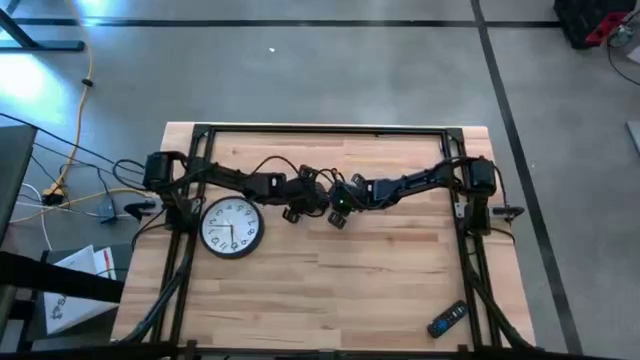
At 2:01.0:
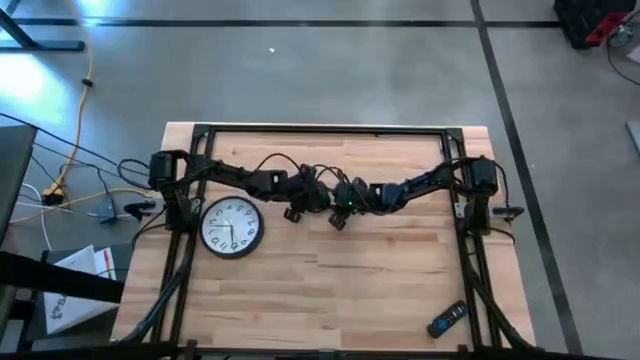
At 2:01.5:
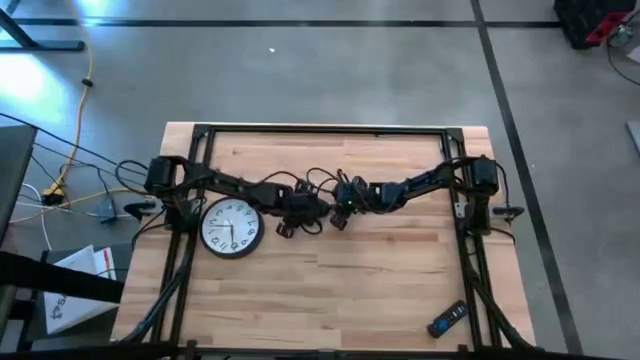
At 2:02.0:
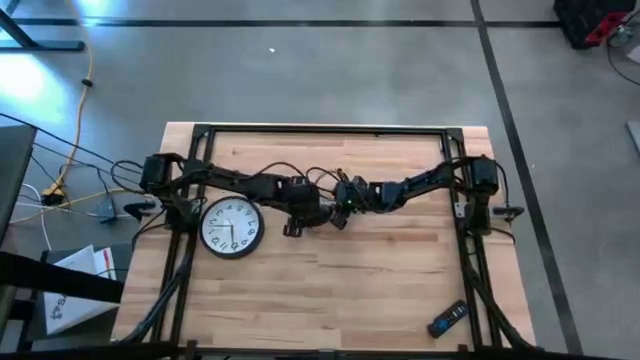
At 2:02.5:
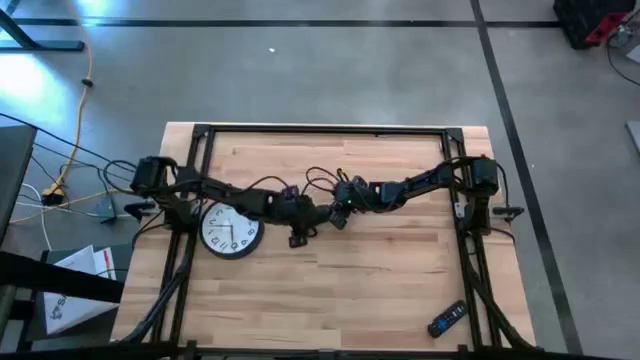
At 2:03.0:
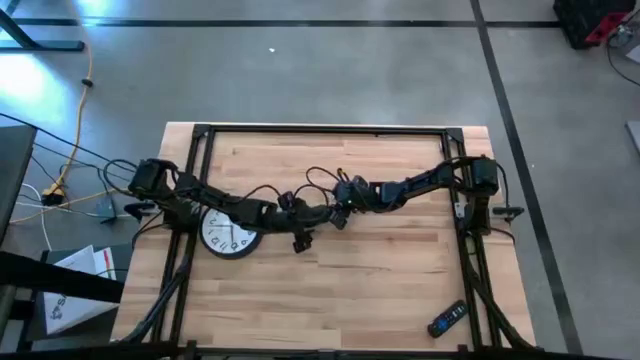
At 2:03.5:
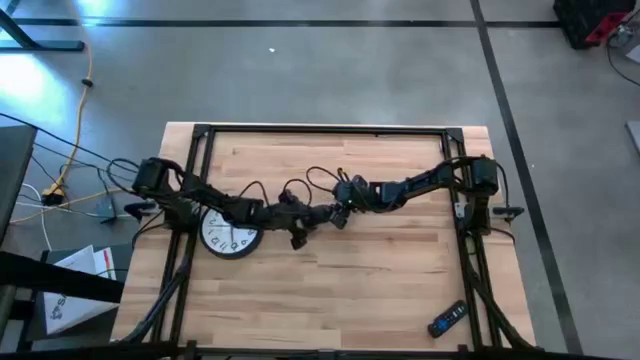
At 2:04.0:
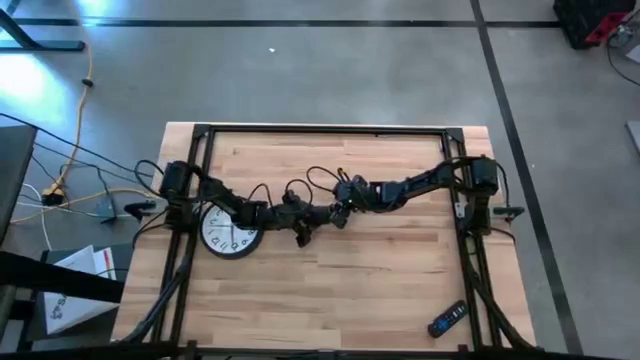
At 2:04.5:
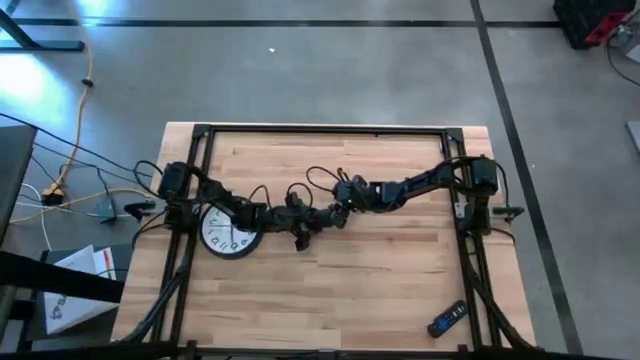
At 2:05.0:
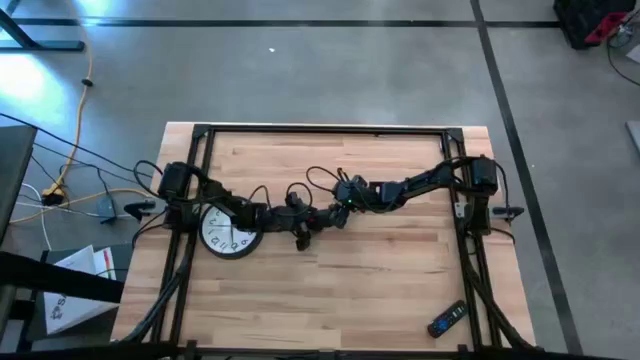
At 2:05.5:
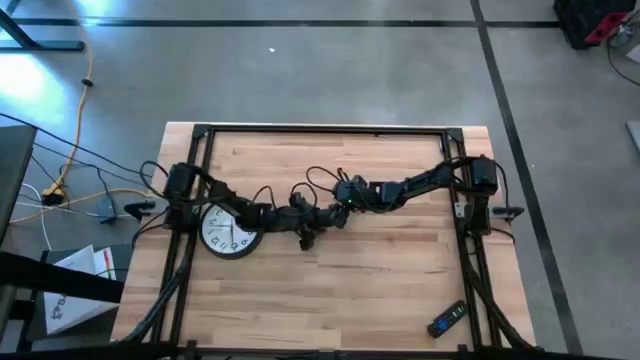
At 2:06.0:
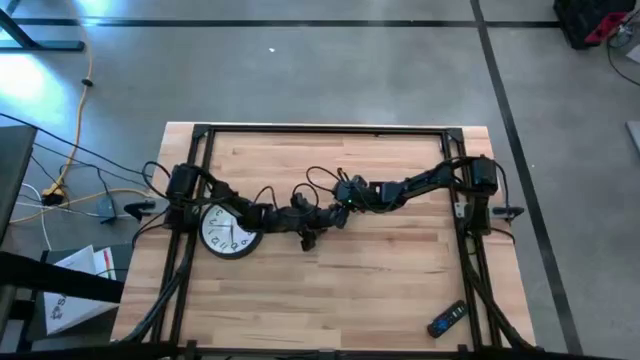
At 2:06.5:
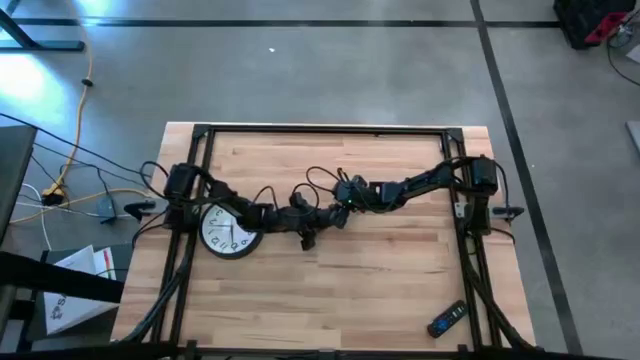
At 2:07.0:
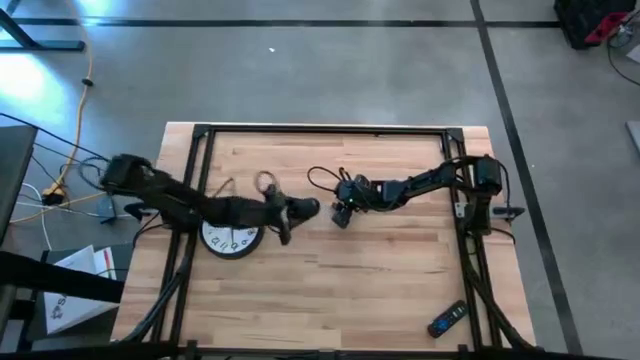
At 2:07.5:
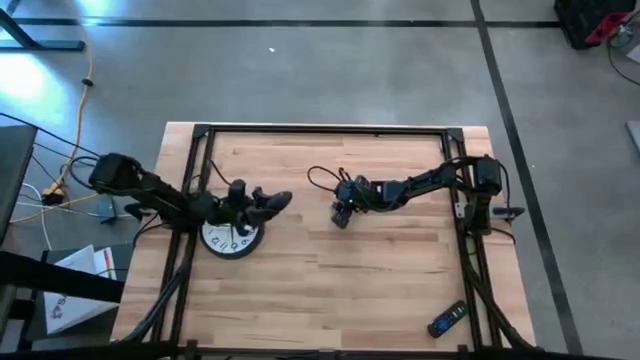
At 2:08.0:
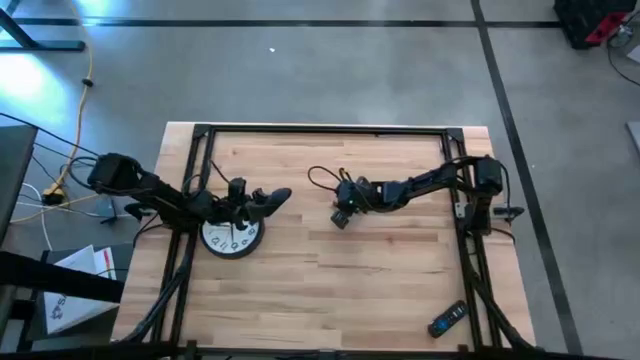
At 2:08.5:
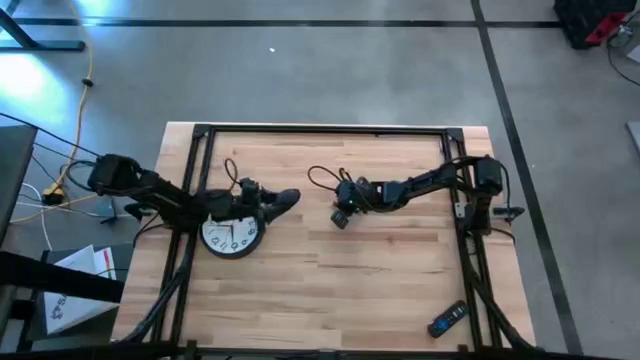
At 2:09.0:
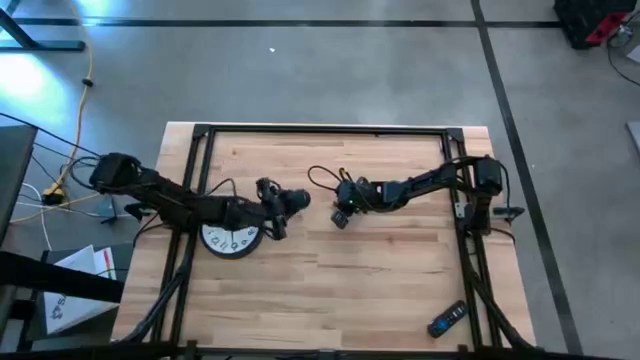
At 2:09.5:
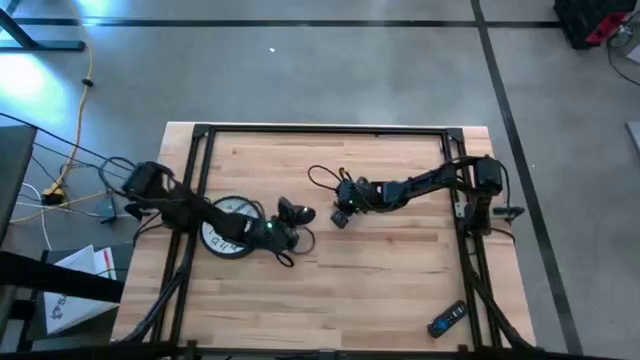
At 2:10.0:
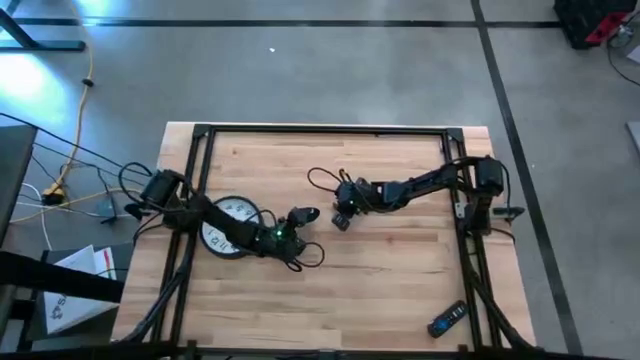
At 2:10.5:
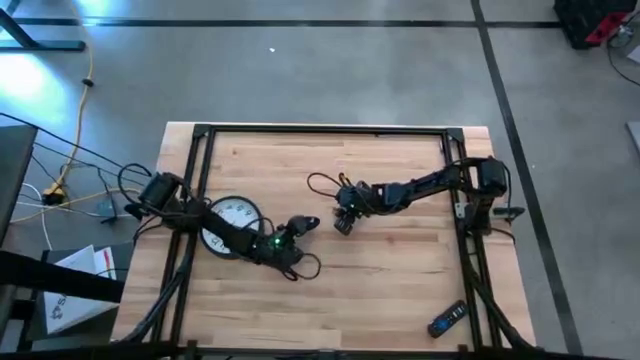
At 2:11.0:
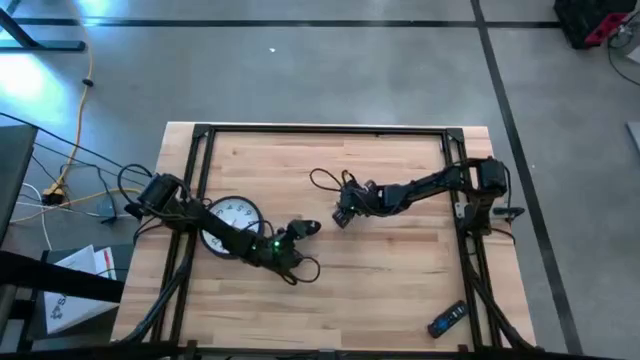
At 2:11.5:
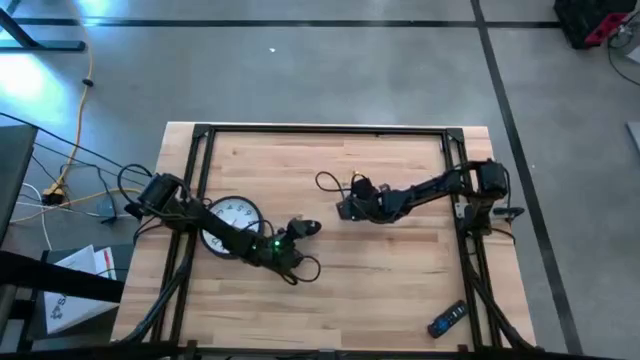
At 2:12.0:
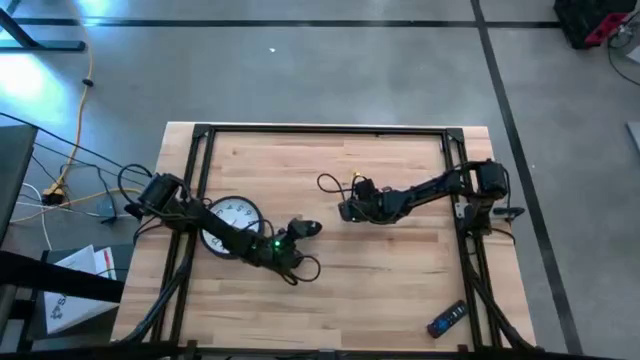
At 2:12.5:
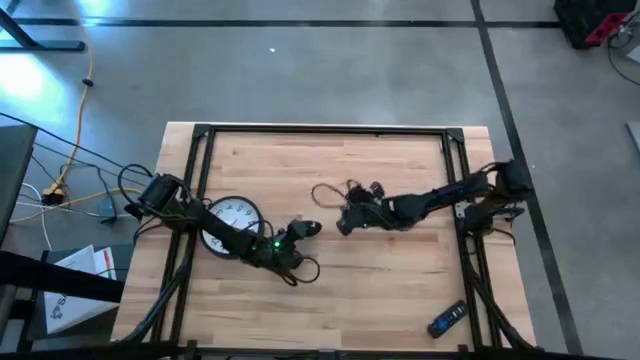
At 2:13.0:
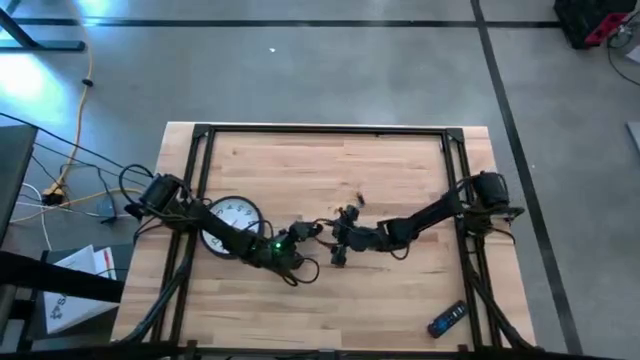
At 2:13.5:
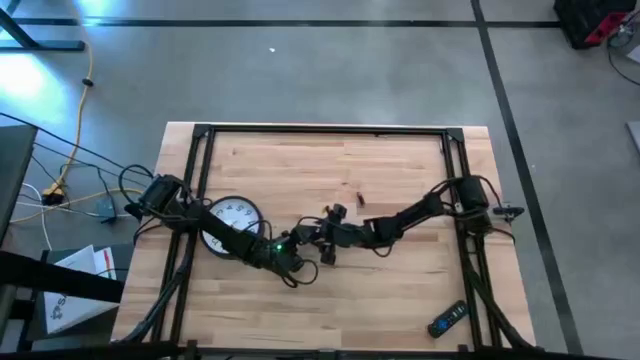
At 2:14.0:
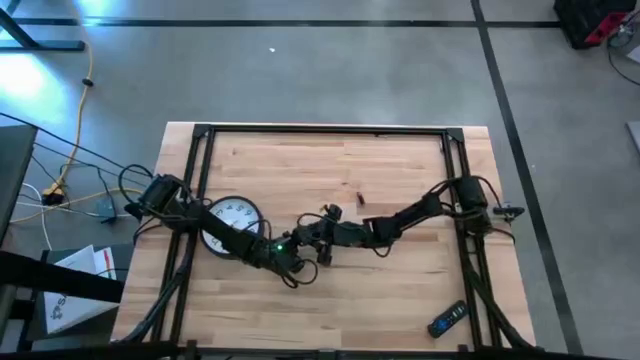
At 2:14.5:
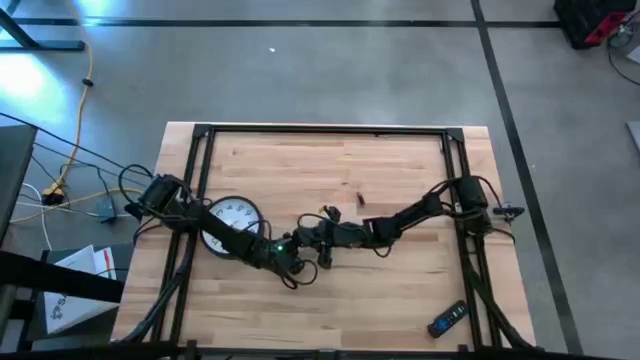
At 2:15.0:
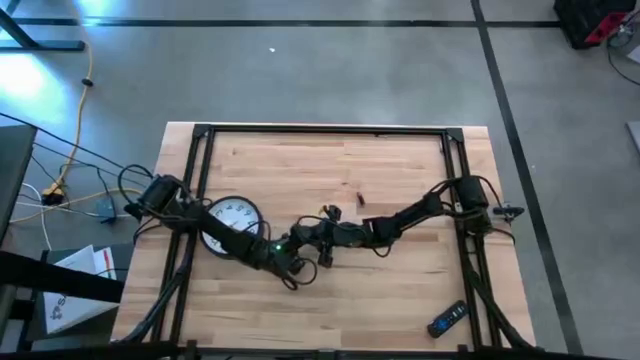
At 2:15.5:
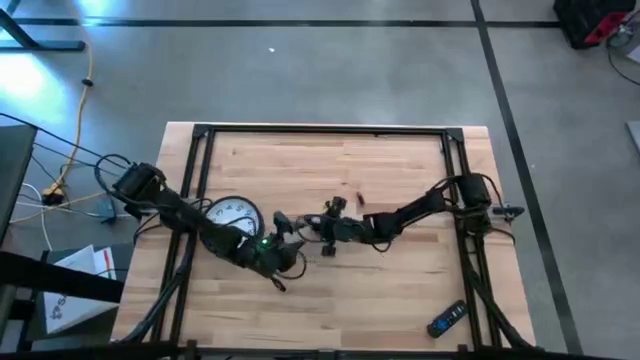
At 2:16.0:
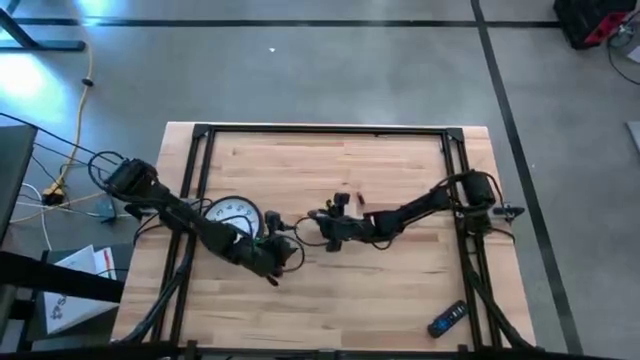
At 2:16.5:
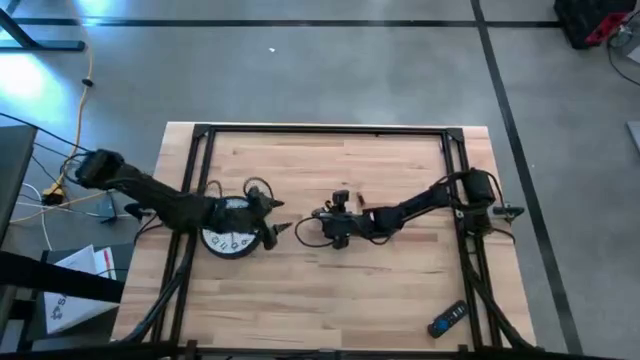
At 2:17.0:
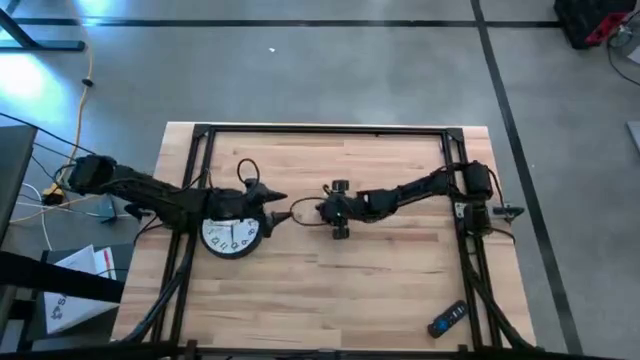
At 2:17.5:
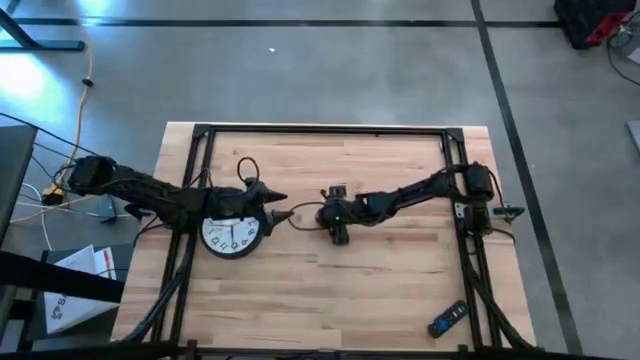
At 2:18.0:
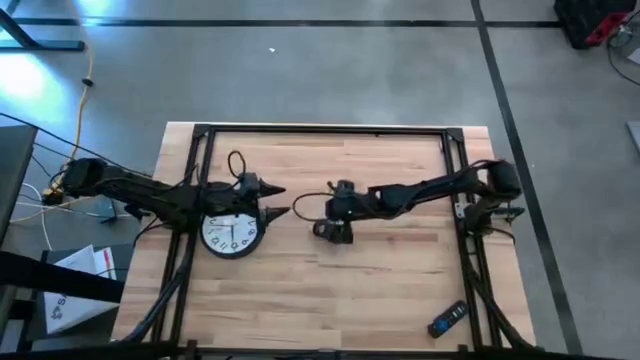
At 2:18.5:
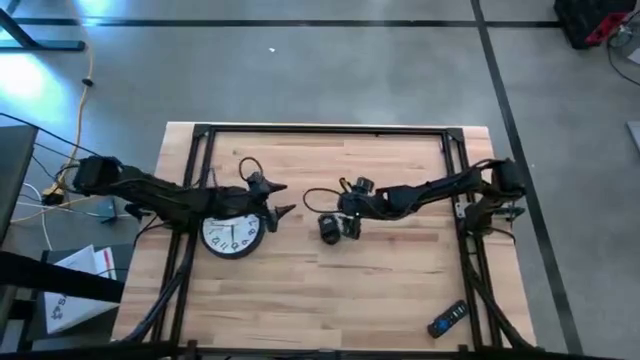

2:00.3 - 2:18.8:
Task: Insert battery
Insert the black battery into the black computer mouse

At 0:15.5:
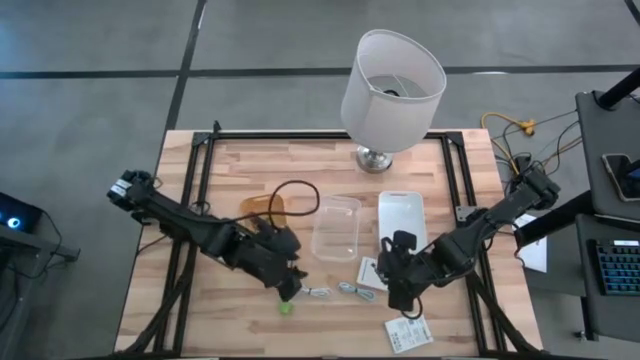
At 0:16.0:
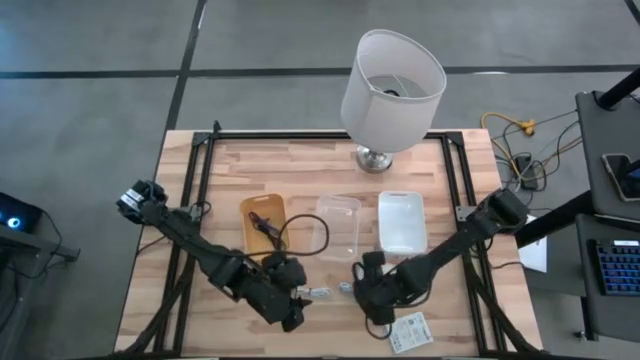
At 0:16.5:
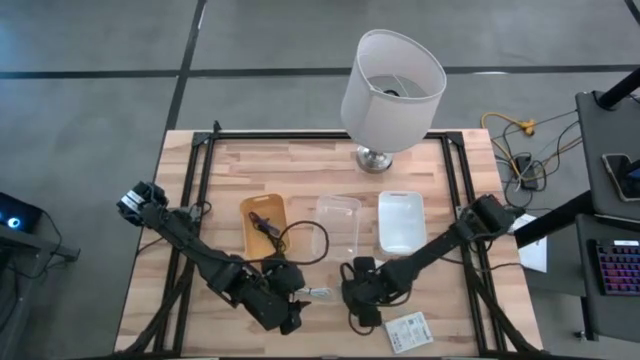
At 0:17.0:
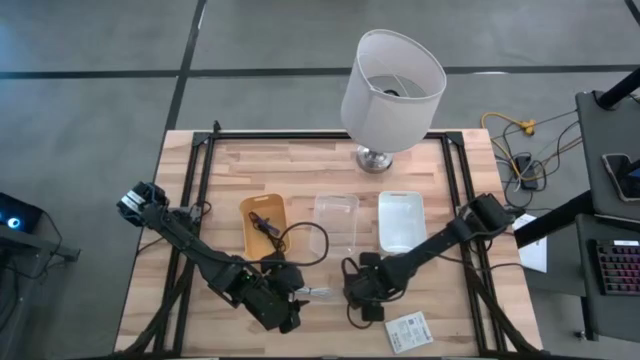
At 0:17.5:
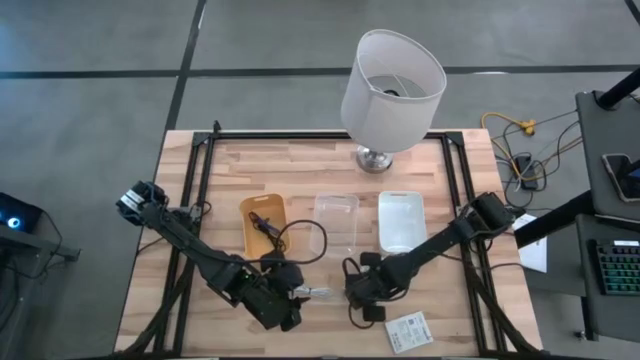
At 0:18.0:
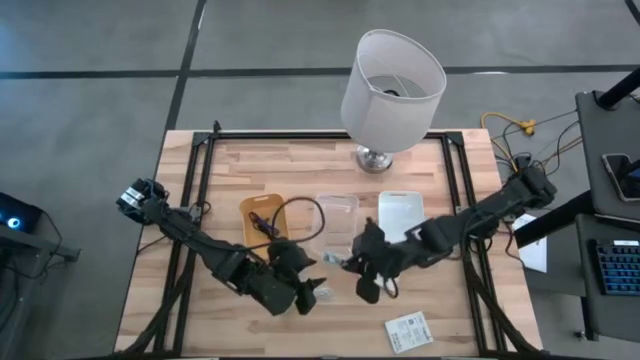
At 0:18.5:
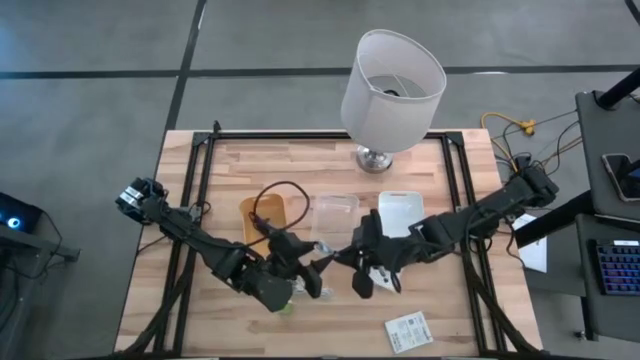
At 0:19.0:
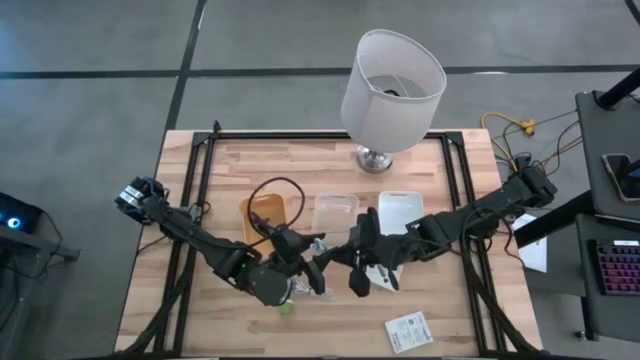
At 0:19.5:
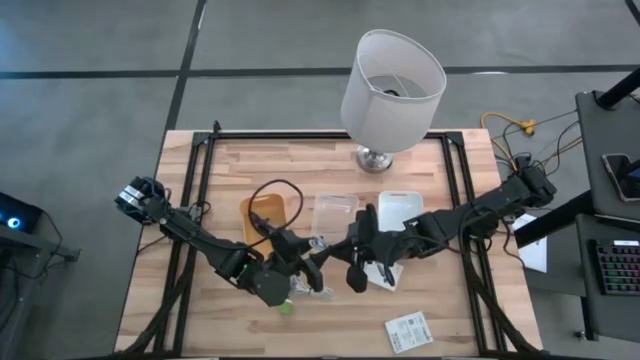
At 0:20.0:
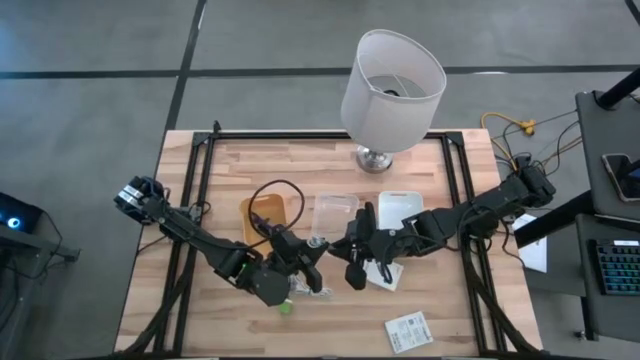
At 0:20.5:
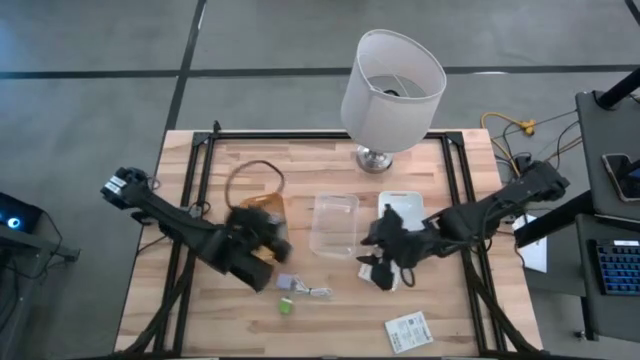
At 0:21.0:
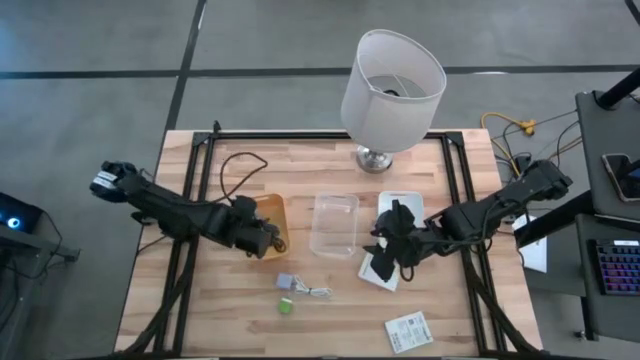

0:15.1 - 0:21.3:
Task: Pick and place items into bin
Put the light blue charger cable into the yellow bin
